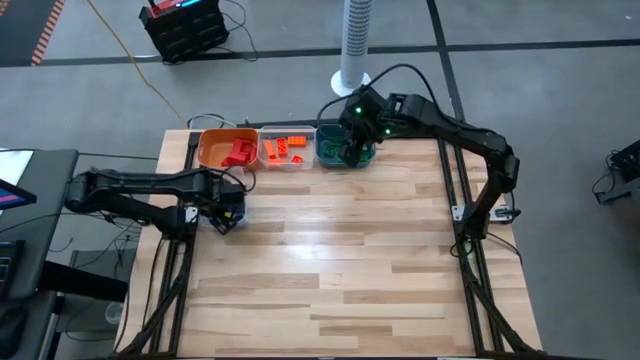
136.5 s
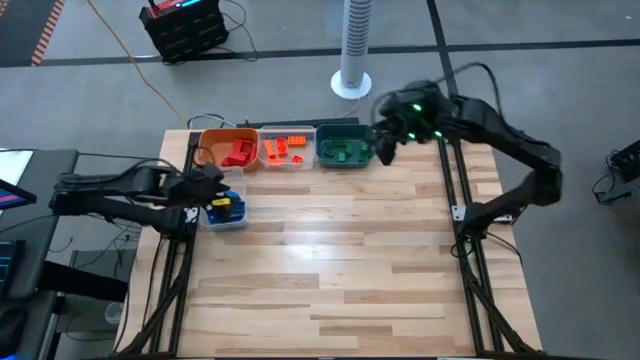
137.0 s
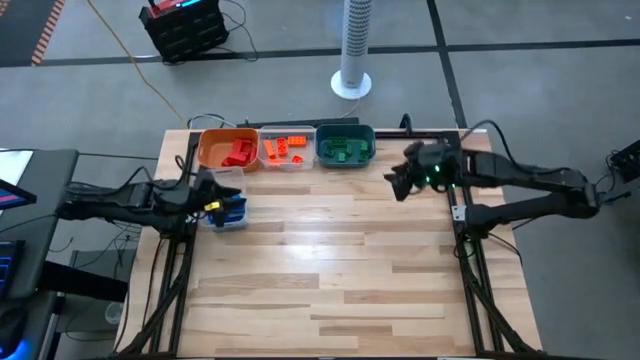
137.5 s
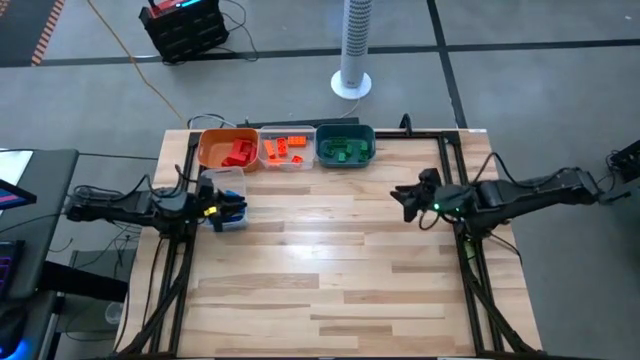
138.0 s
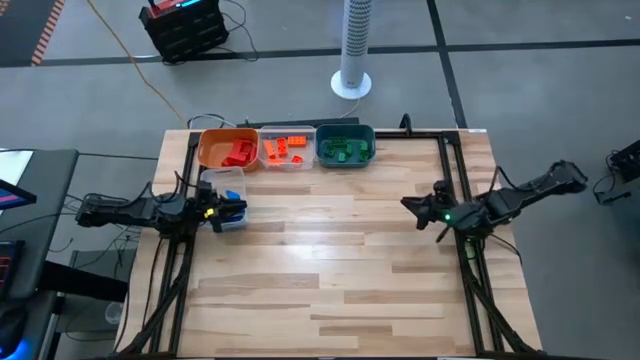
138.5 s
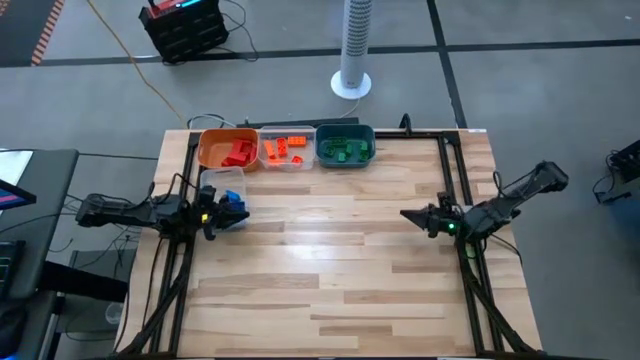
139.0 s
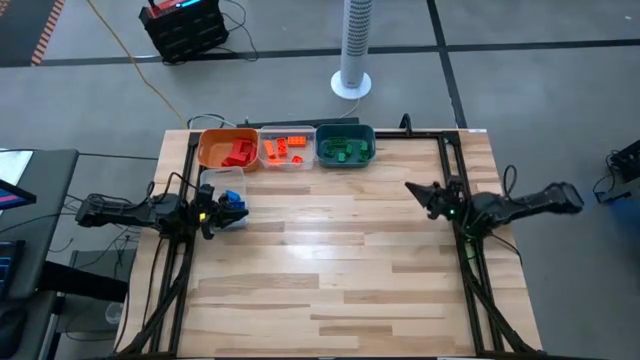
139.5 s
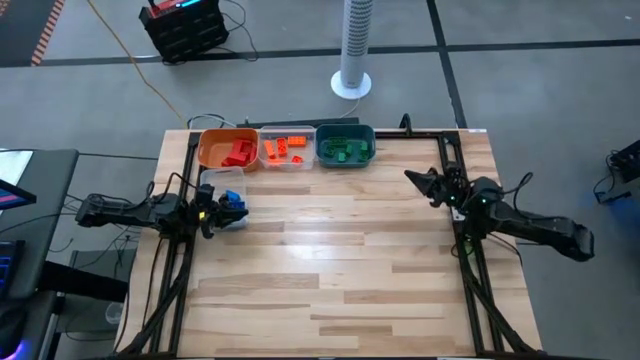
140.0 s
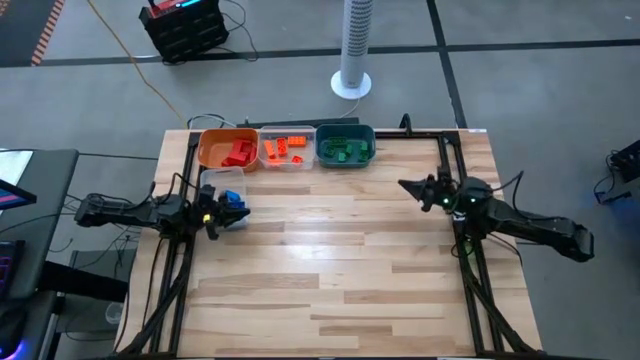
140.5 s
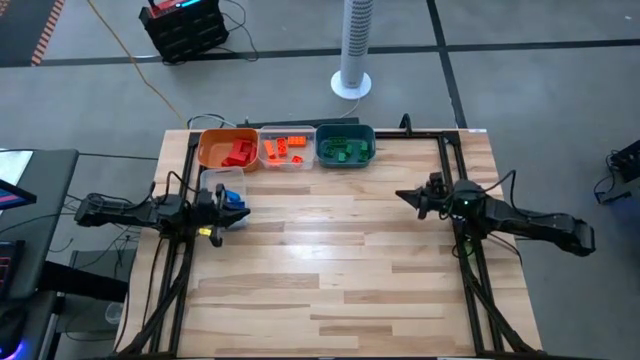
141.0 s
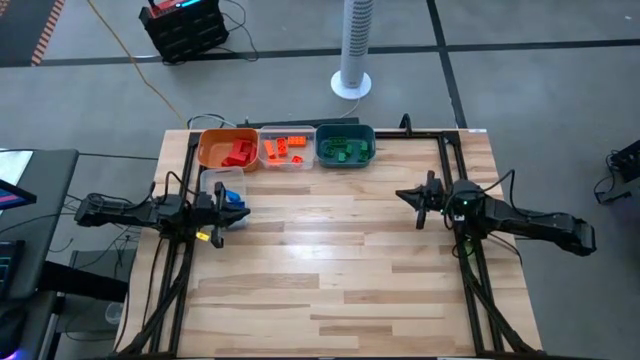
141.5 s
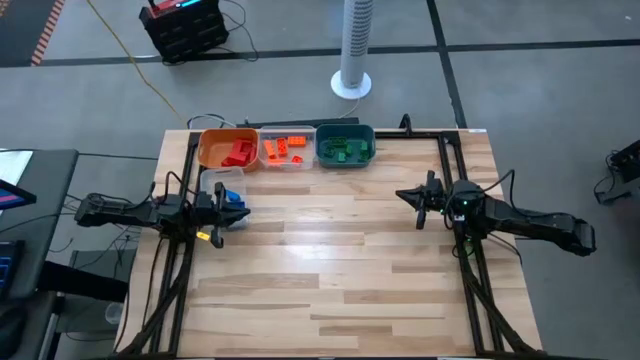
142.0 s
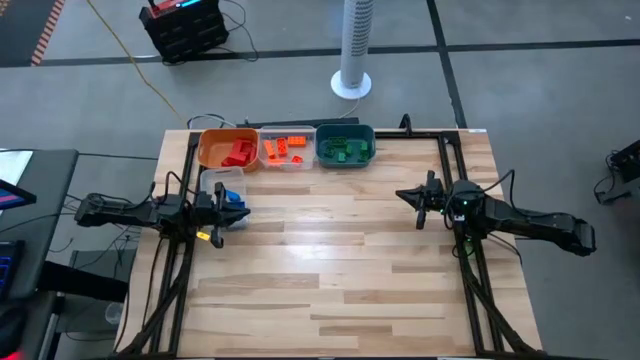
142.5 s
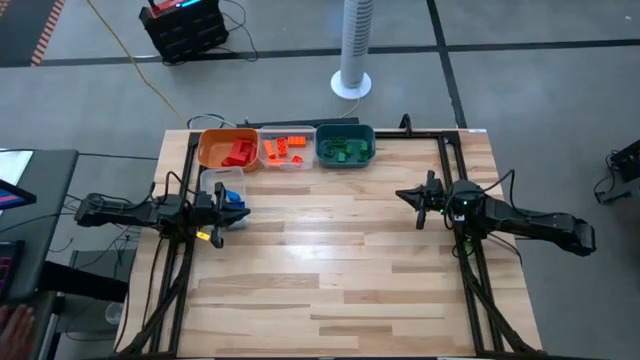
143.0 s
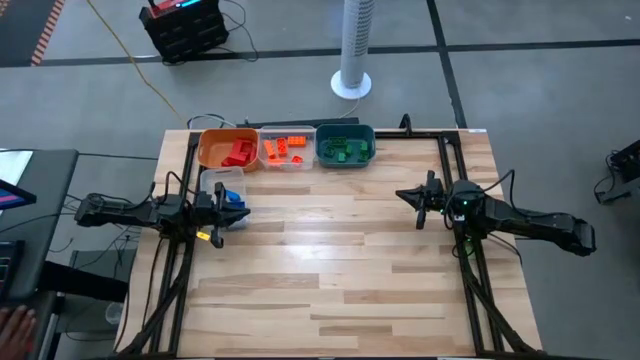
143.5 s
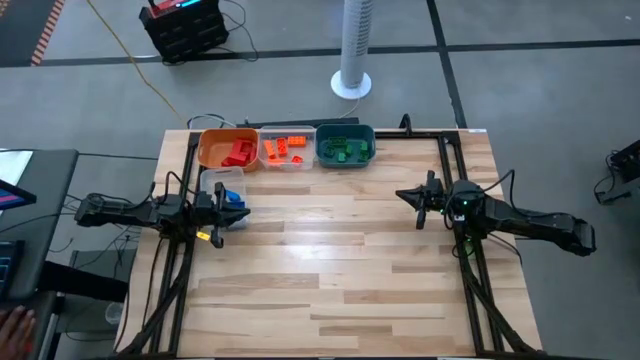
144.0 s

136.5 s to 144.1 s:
Task: Sort blocks
Return to Home Position

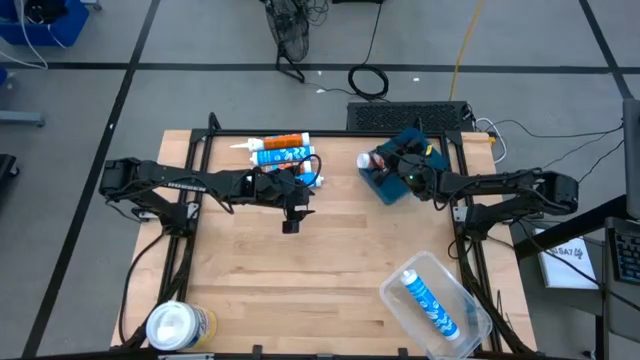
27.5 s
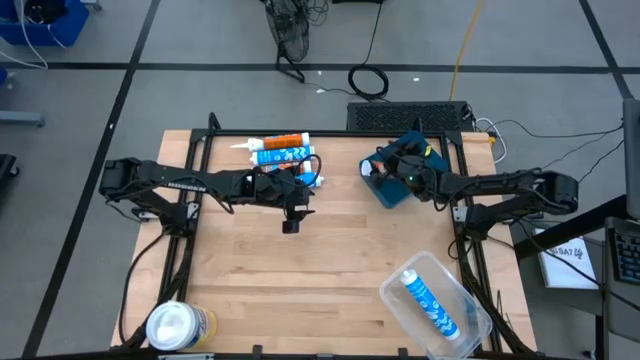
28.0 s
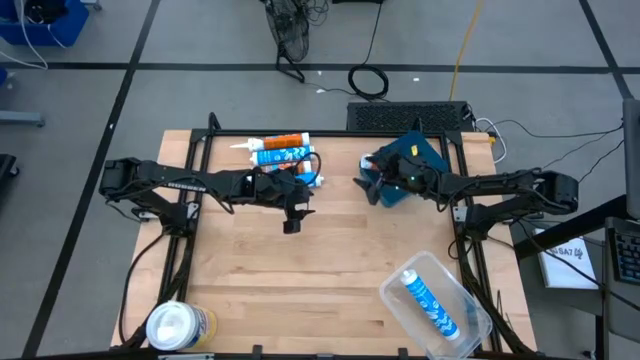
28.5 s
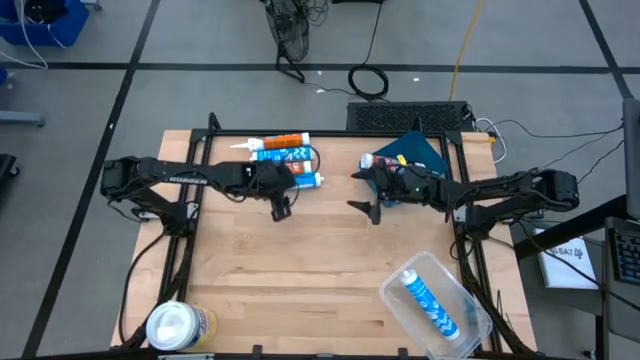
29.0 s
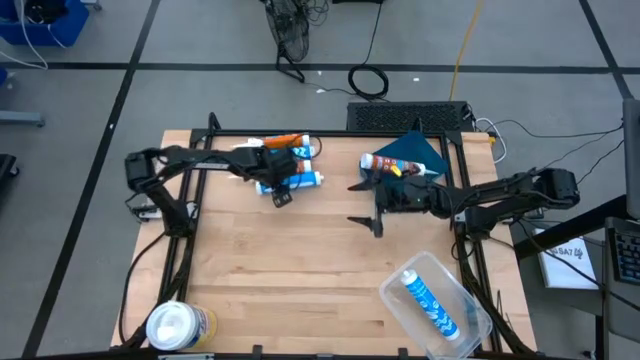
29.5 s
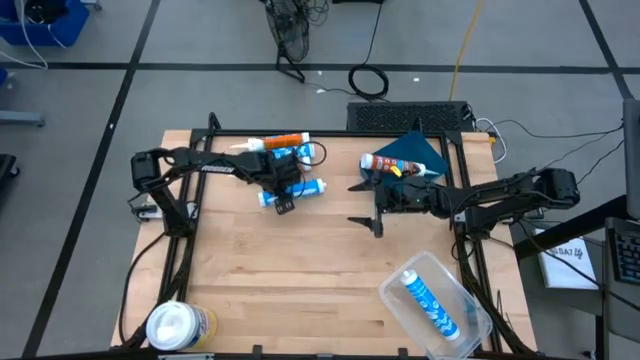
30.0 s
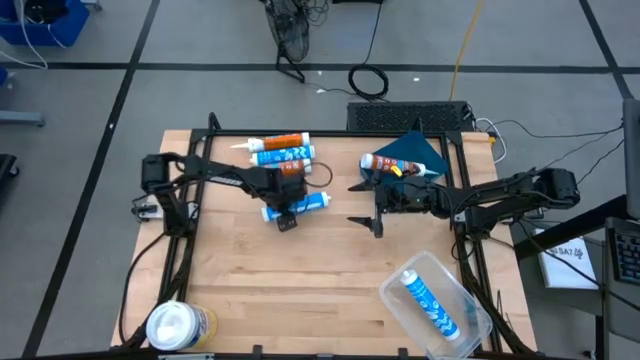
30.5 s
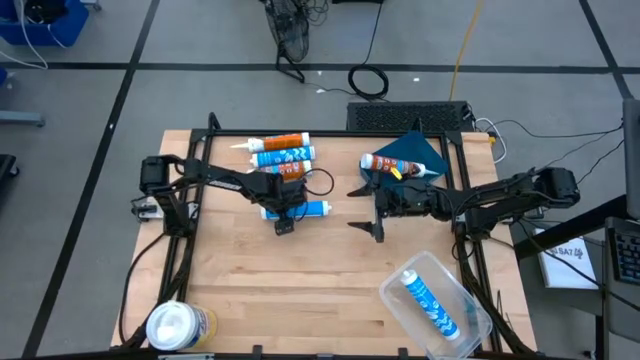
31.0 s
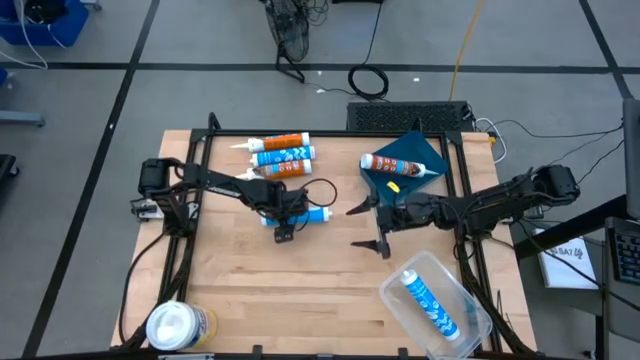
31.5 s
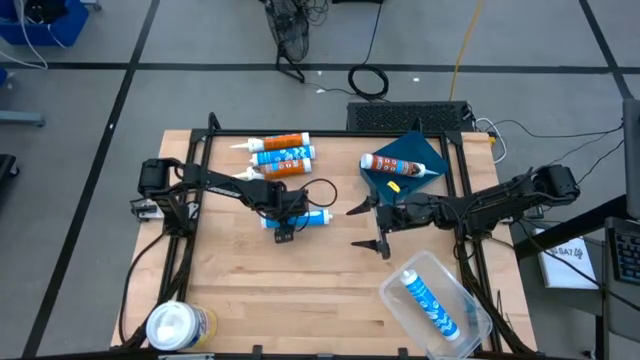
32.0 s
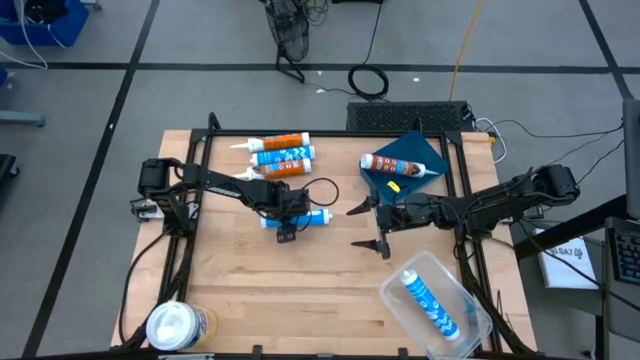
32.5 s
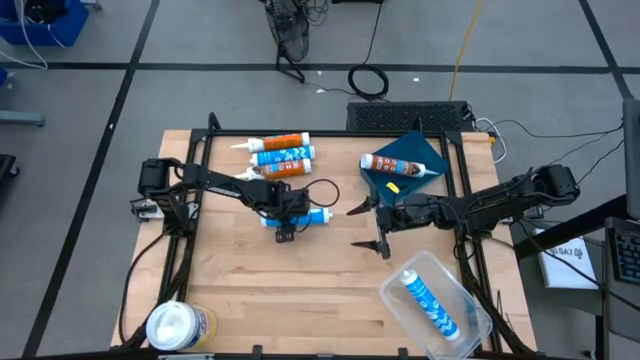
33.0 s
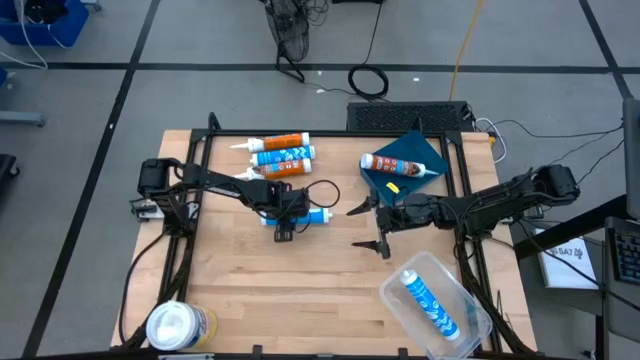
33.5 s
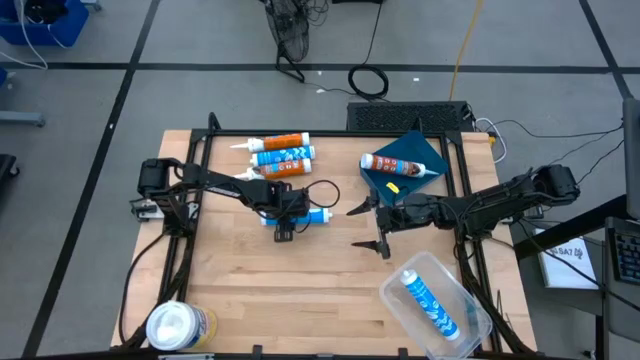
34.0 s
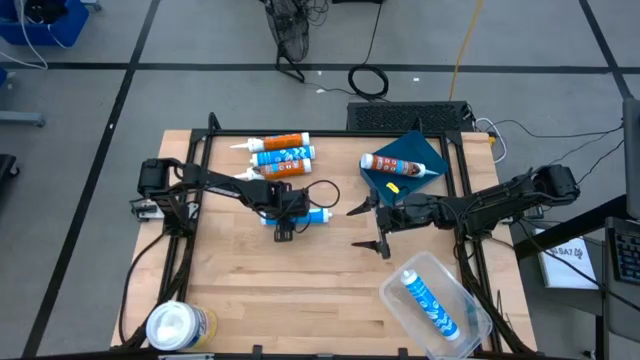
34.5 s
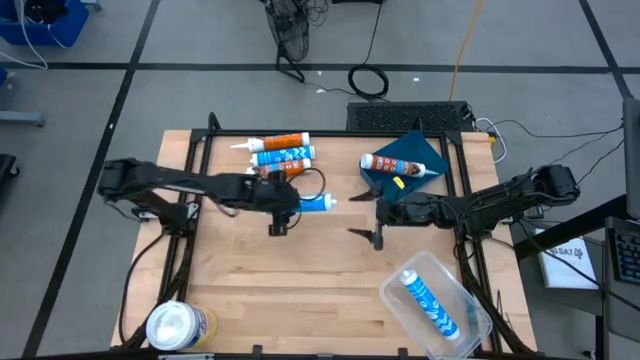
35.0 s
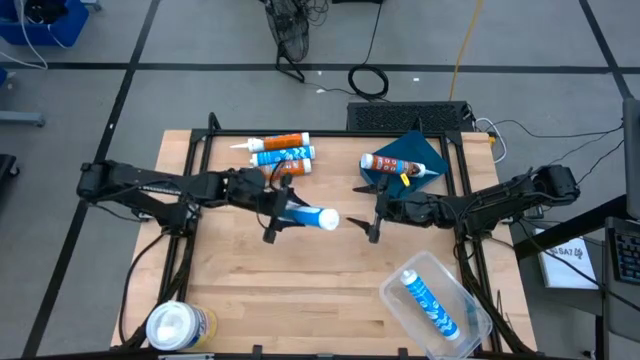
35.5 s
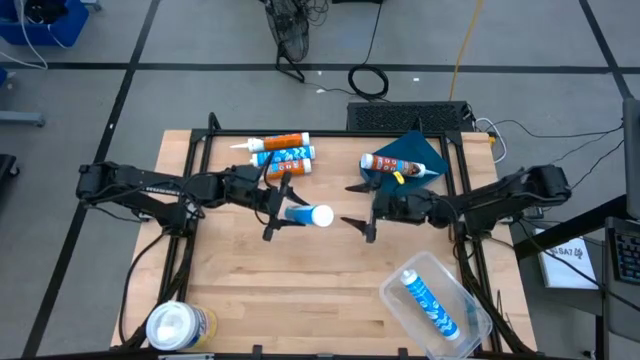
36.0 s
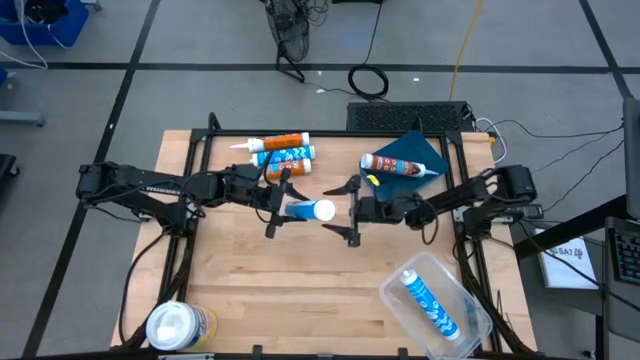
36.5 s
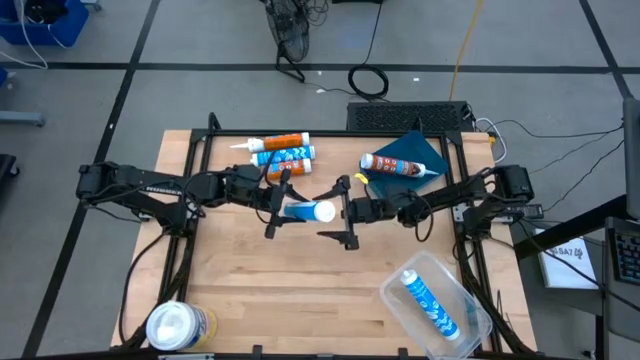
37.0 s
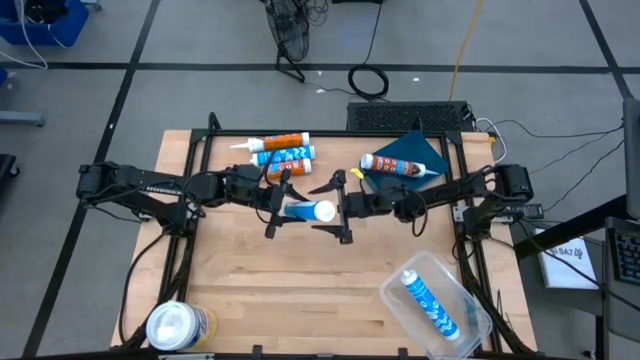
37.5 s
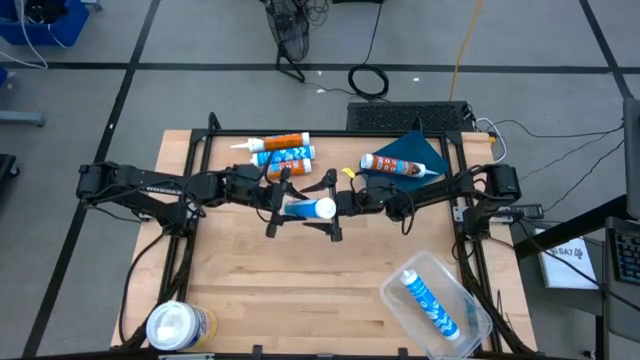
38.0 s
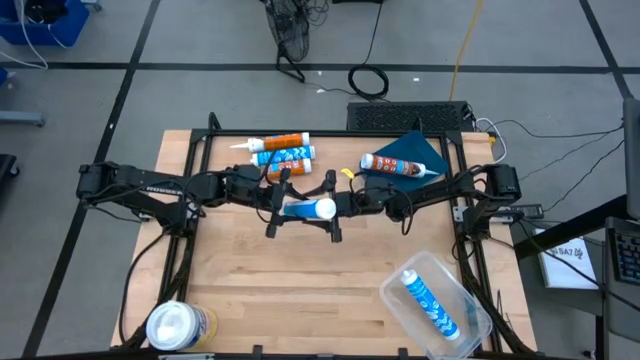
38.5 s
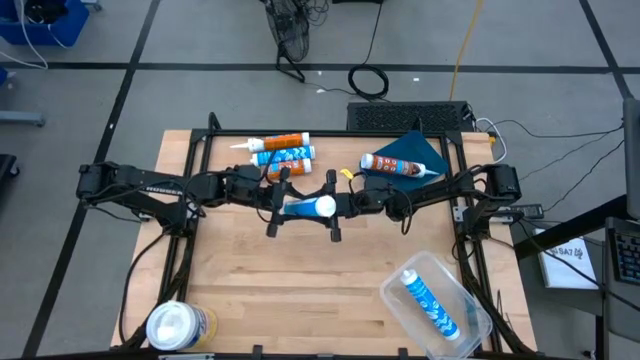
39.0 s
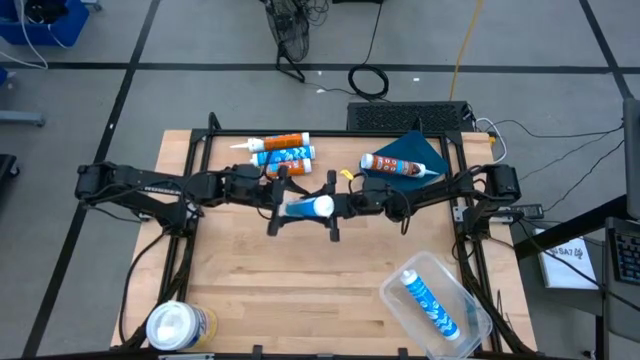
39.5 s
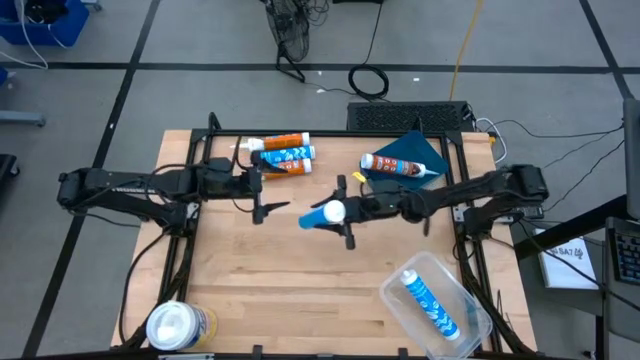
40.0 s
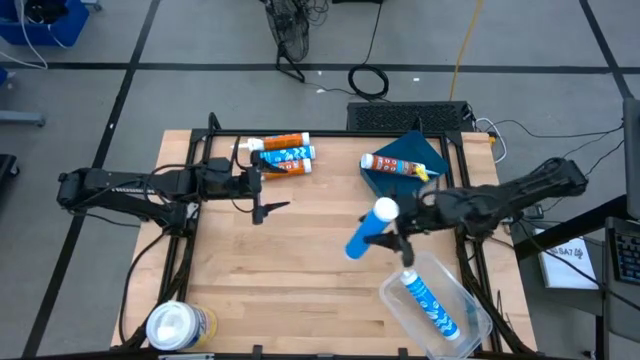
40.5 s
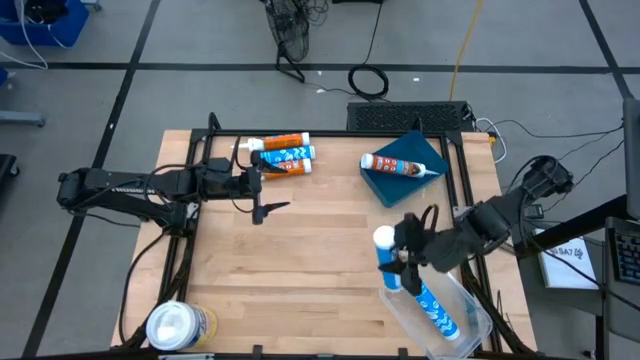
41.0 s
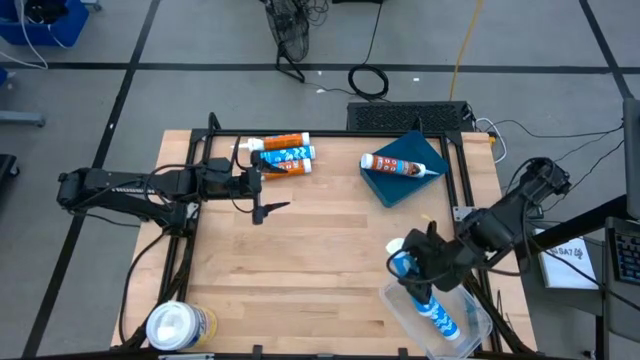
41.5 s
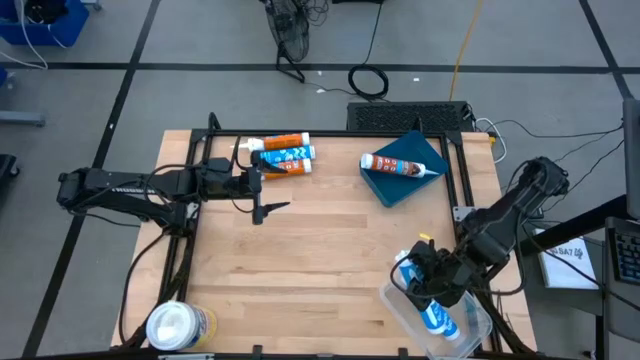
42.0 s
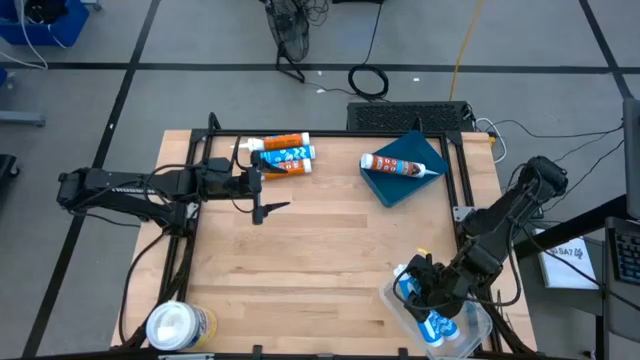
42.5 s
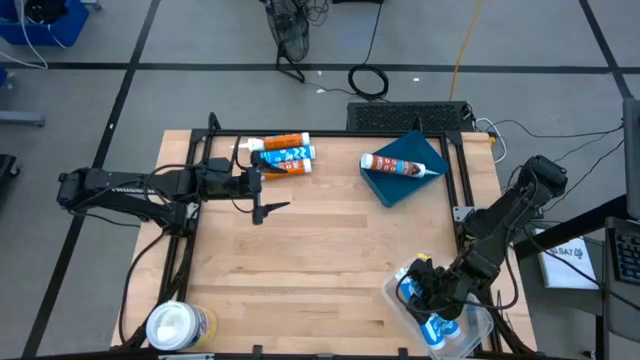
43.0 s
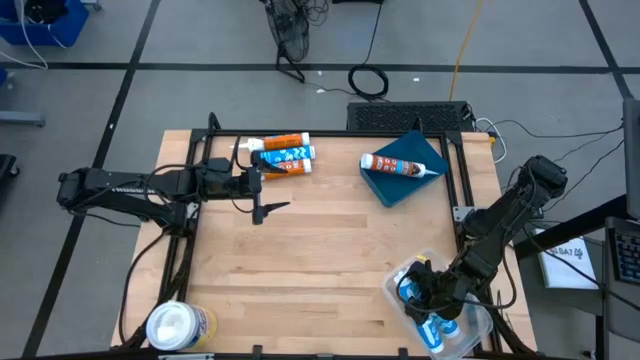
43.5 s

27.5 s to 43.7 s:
Task: Pick & place silicon tubes, Sealant and Lysol wipes
Put the bottom blue sealant into the transparent bin
